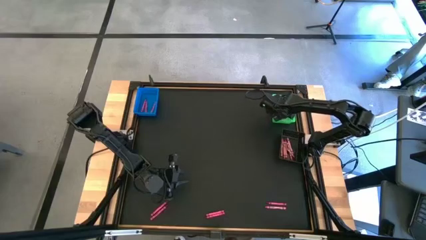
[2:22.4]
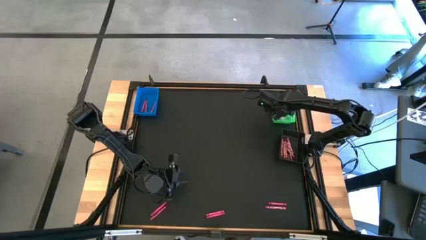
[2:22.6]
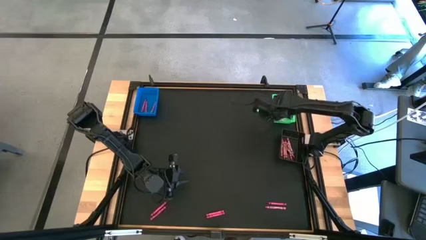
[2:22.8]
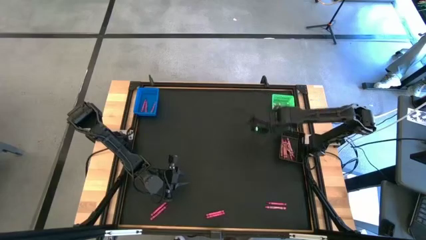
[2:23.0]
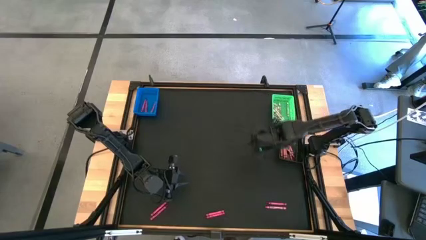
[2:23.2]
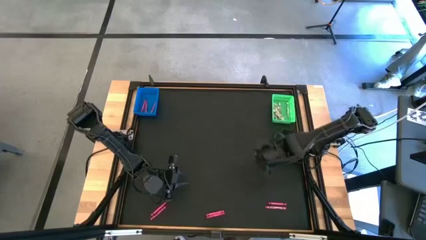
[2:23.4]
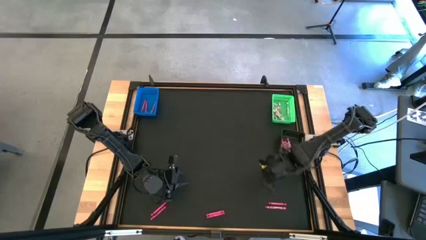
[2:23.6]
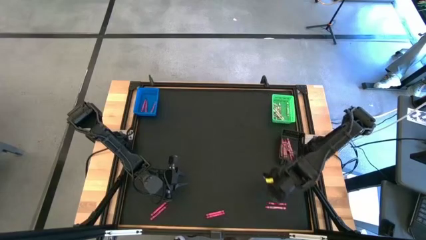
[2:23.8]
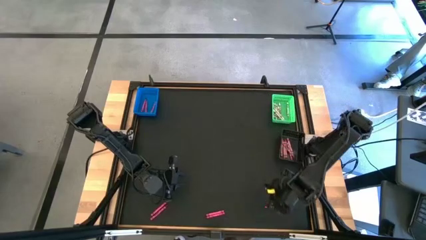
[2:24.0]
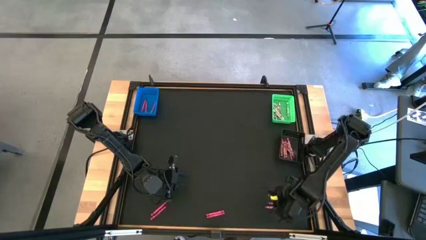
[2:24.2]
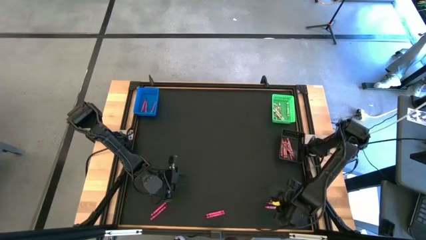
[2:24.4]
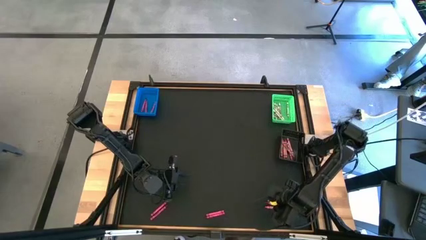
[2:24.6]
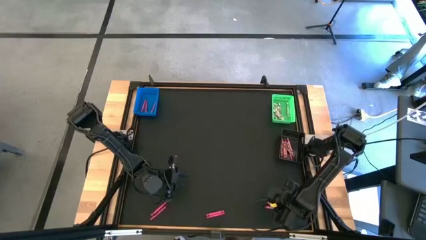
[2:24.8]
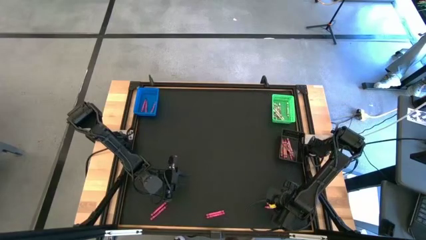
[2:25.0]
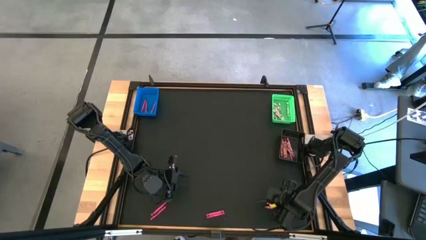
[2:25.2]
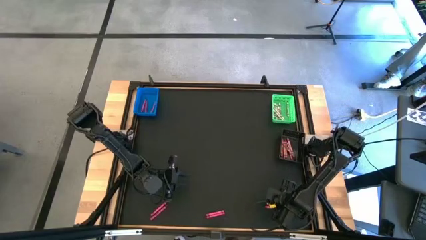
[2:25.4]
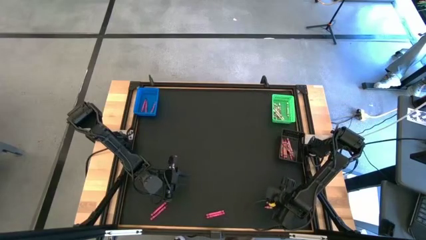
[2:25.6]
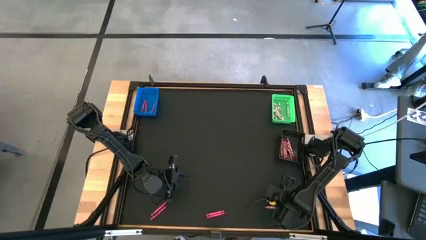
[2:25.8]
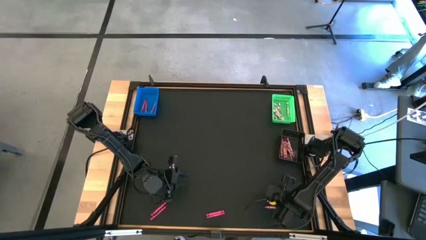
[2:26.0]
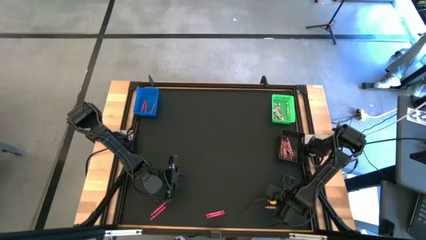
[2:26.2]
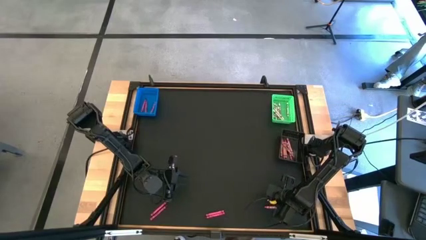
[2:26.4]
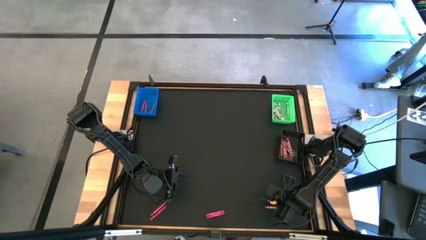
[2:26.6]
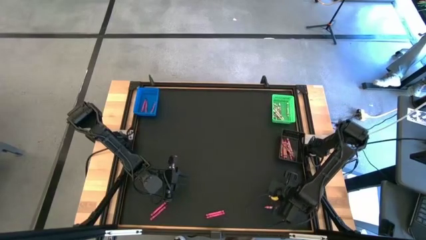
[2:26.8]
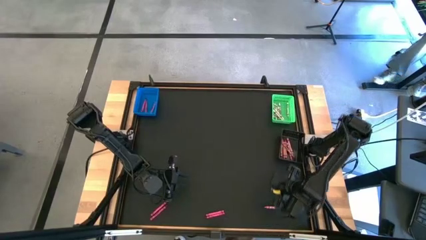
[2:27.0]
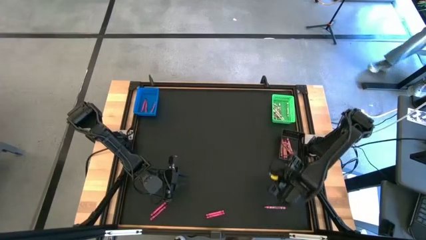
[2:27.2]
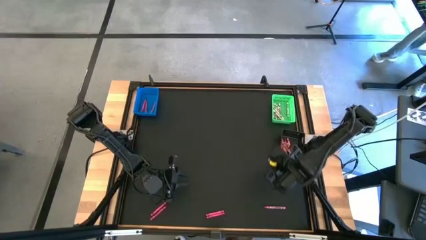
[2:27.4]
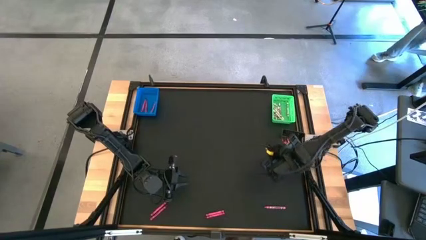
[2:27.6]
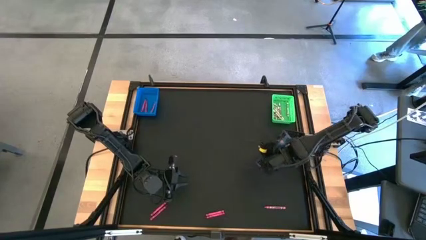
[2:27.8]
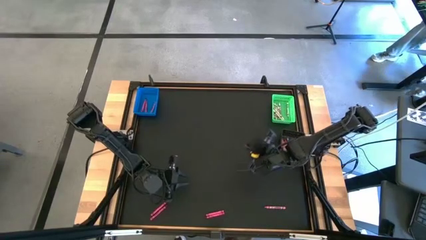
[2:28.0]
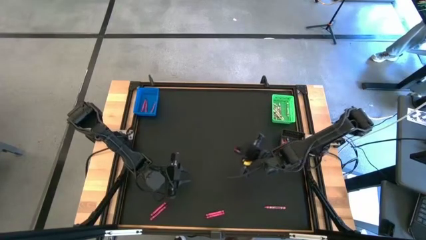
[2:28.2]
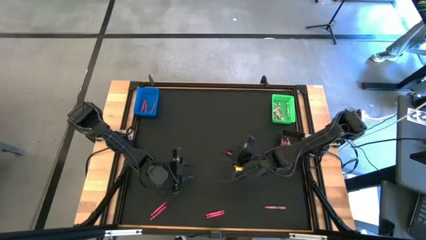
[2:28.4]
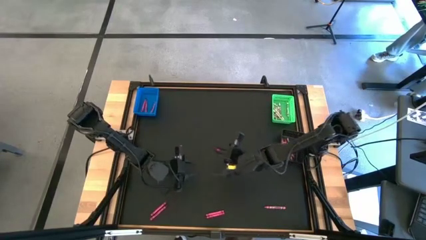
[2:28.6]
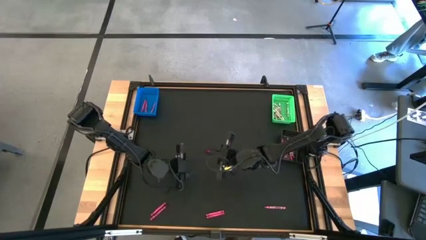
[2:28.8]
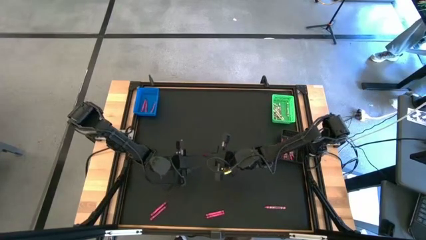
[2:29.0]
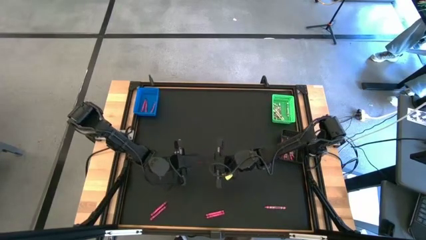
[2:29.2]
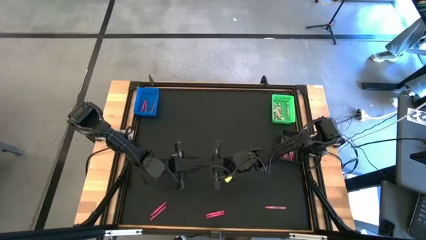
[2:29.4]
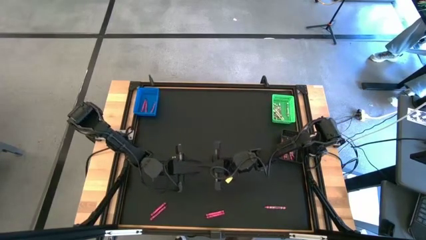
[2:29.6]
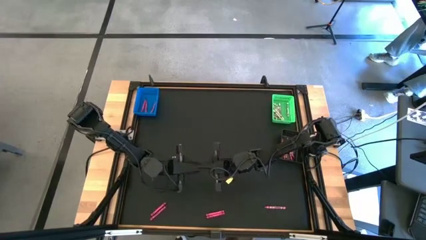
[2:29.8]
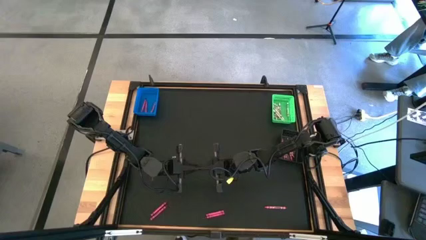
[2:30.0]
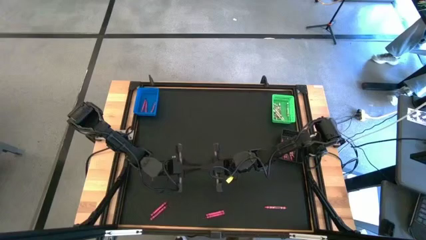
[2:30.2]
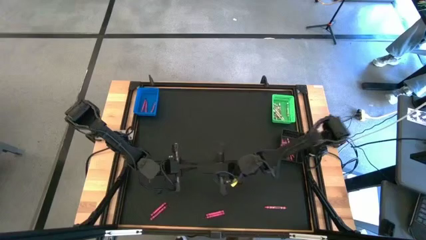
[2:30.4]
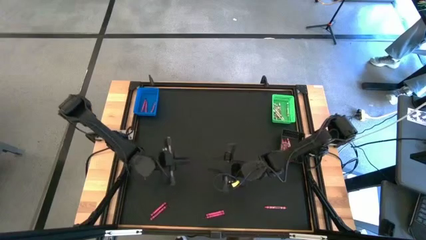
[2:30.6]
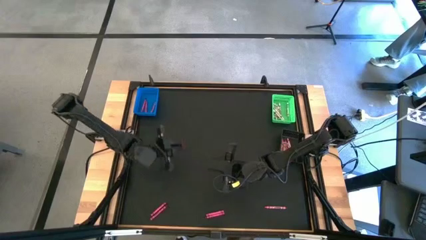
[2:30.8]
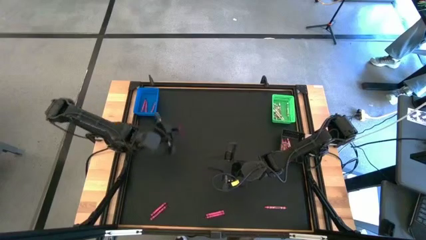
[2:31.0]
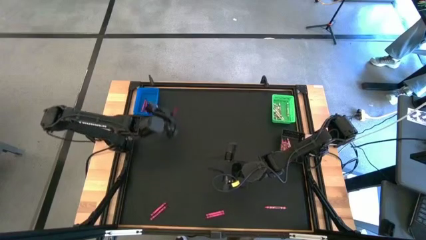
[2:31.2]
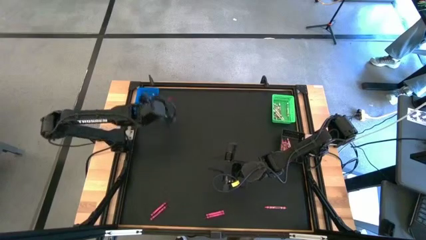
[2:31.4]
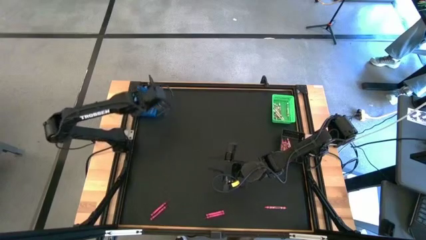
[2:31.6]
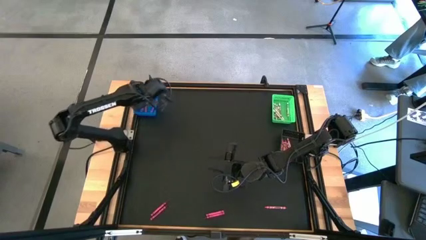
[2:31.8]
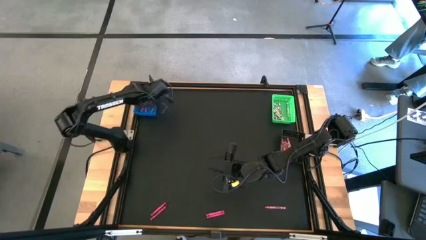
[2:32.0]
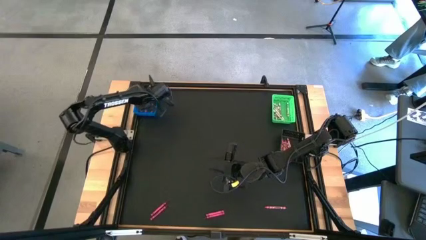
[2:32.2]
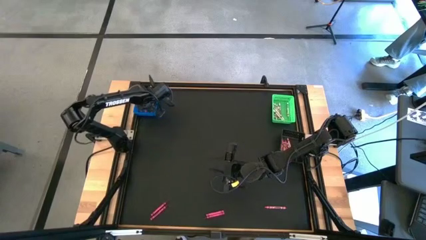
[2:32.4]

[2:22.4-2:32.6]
Task: Sort crayons
Put the red crayon into the blue bin

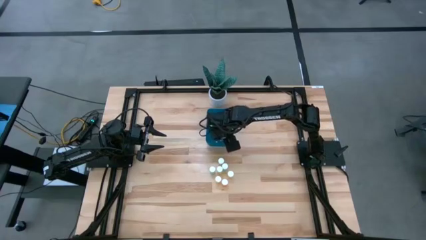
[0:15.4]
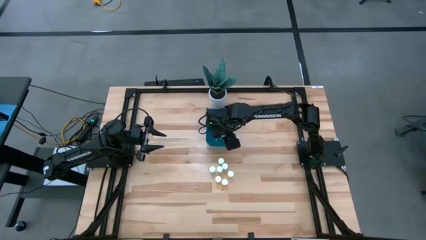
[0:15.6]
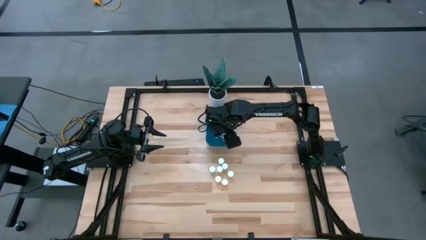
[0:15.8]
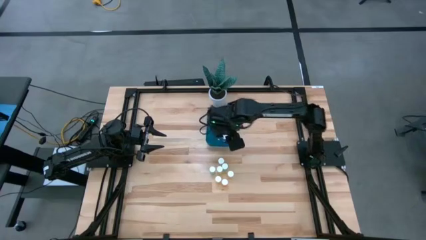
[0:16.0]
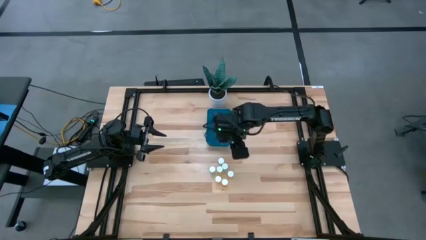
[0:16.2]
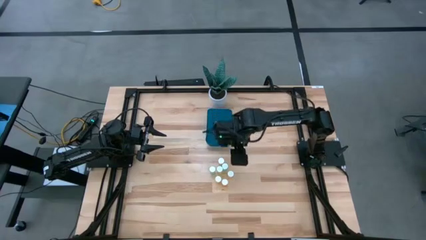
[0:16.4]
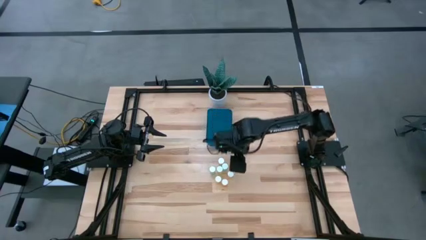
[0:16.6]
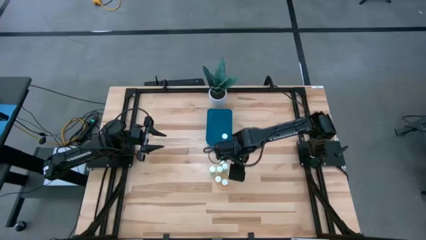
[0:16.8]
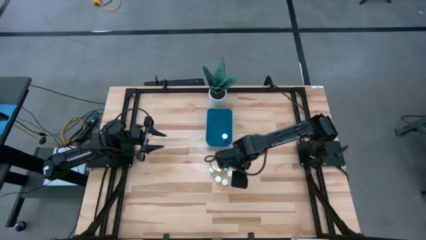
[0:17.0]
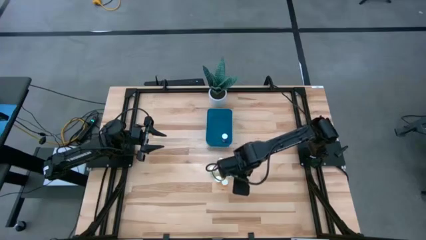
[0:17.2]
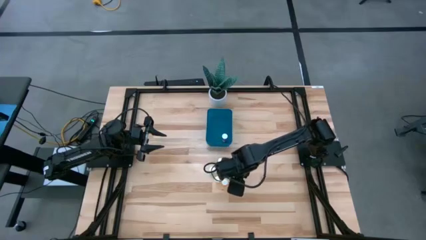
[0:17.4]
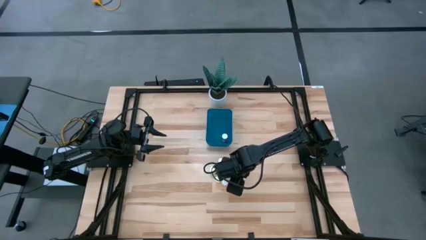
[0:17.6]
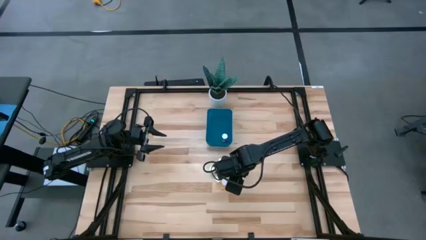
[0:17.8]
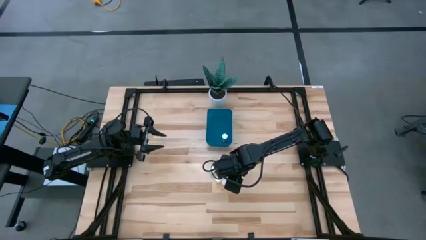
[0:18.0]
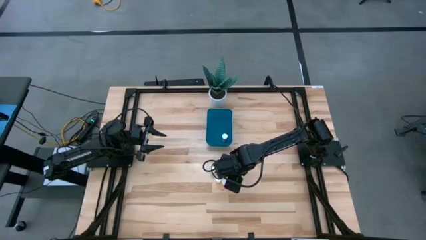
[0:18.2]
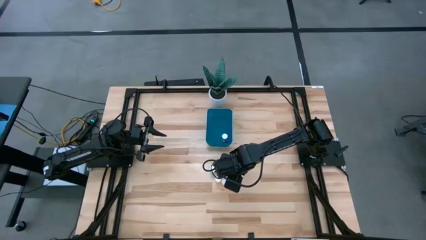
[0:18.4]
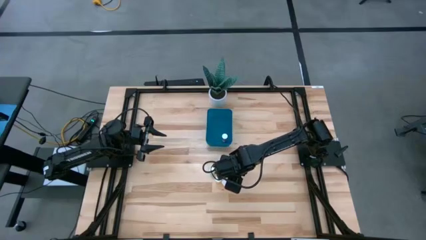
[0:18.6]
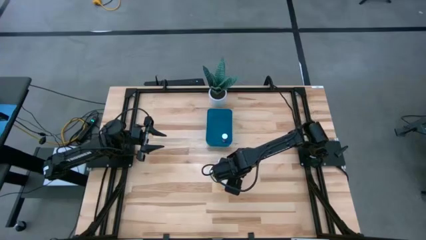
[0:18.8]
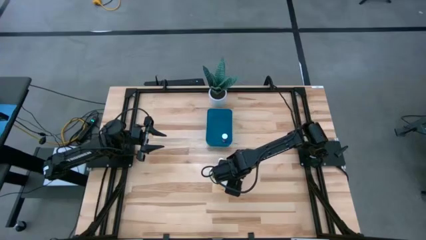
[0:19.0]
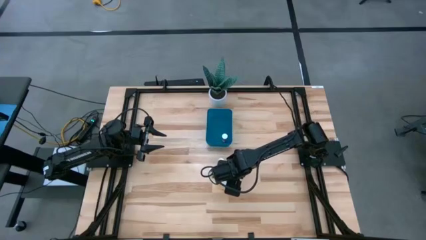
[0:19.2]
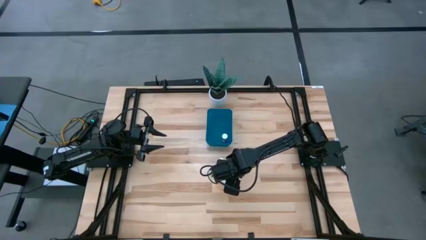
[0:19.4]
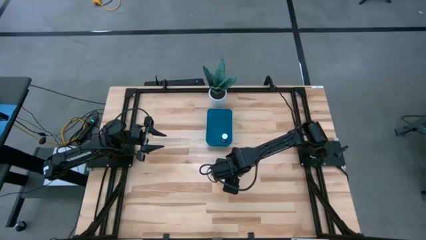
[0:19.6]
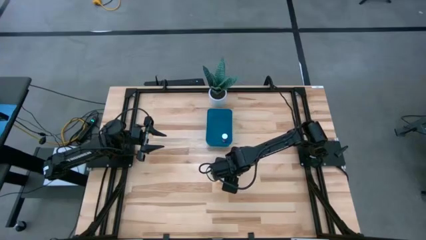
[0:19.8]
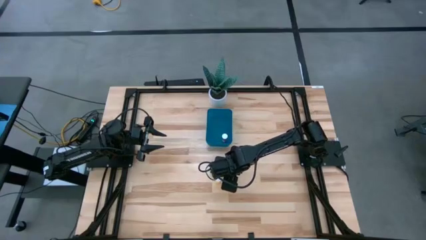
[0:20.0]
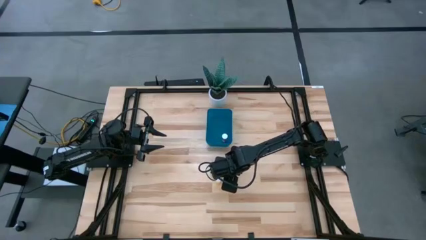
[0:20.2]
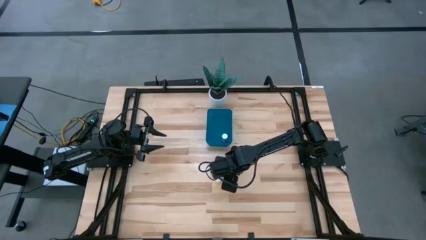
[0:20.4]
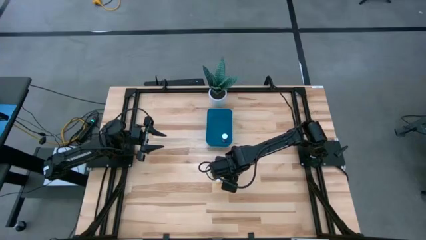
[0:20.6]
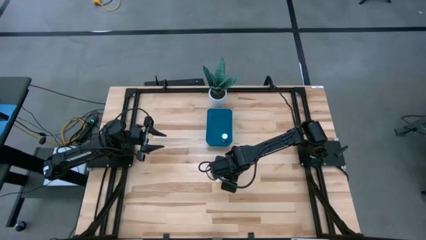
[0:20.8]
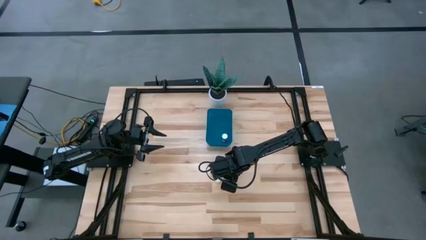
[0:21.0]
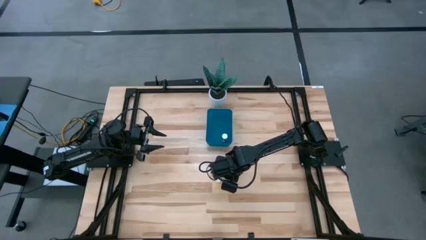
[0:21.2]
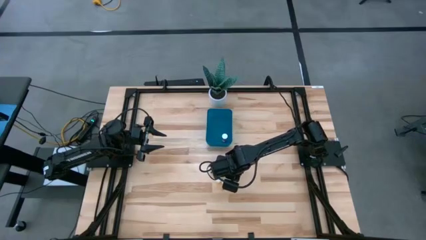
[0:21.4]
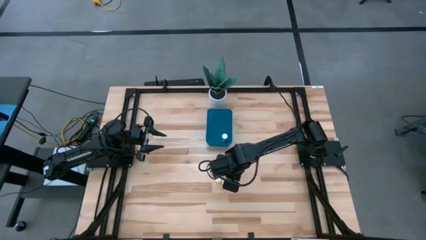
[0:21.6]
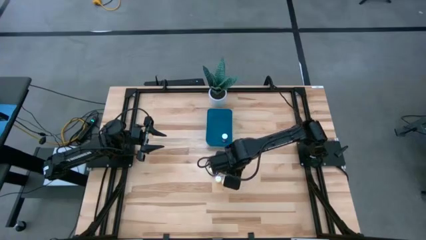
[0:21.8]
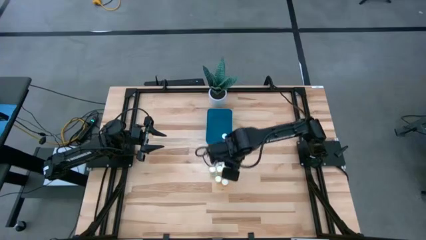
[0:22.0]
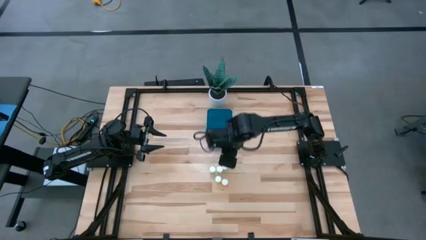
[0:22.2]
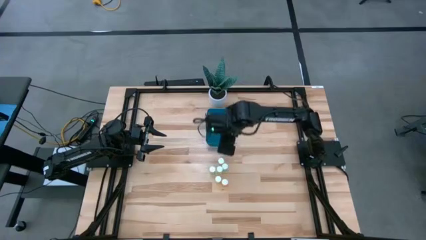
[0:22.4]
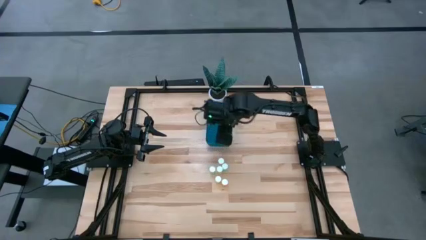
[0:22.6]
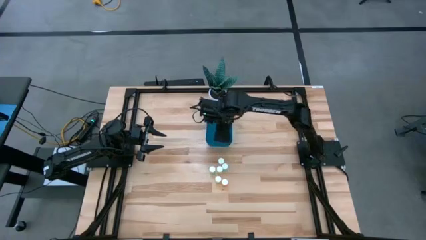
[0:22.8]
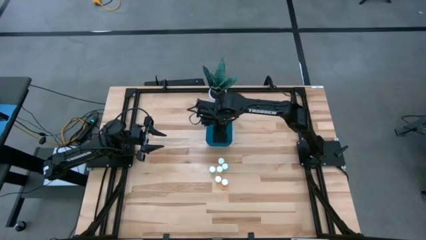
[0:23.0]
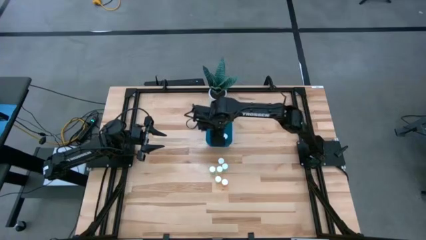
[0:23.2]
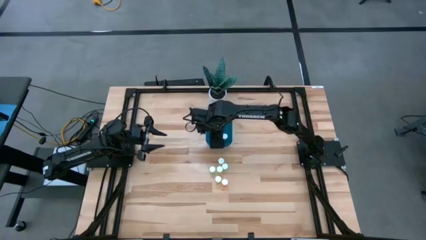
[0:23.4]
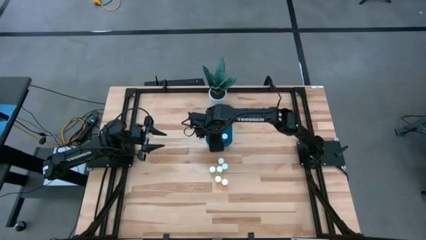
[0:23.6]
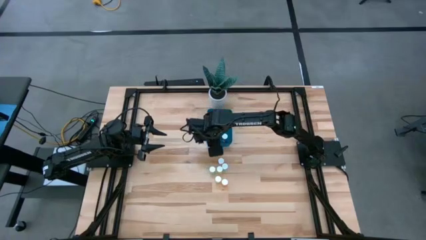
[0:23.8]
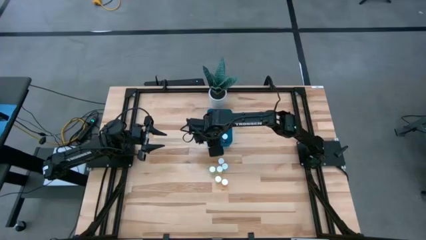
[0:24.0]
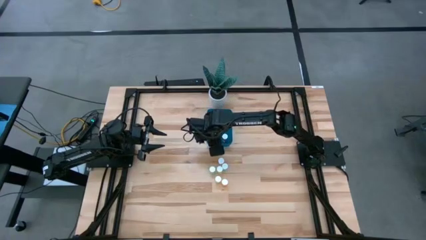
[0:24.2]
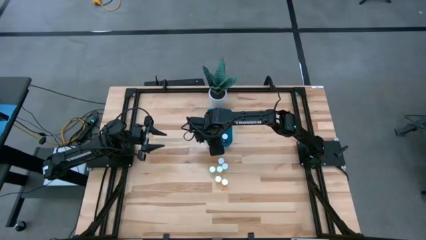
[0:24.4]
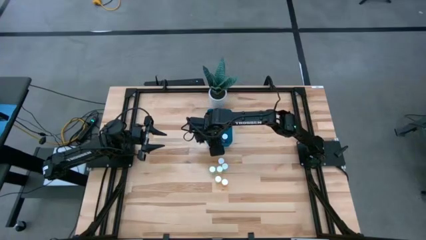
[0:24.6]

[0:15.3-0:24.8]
Task: Pick and place pill bottles into a basket
Put the right green pill bottle into the bin
